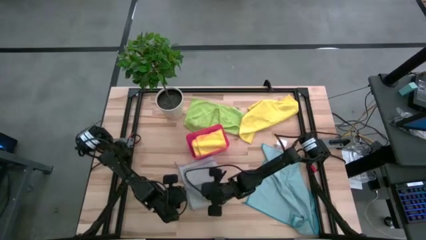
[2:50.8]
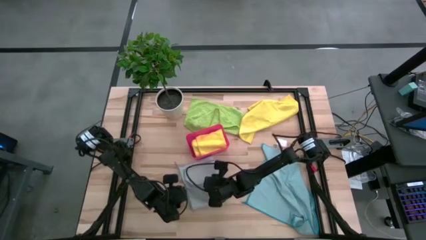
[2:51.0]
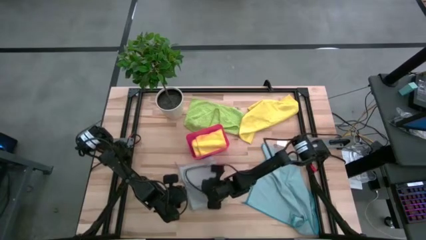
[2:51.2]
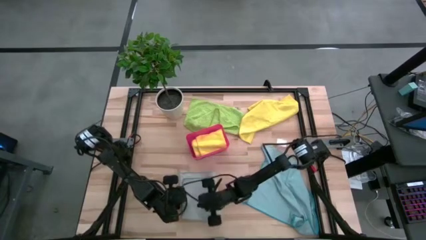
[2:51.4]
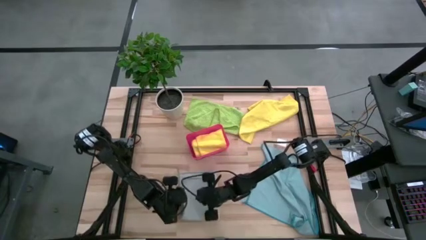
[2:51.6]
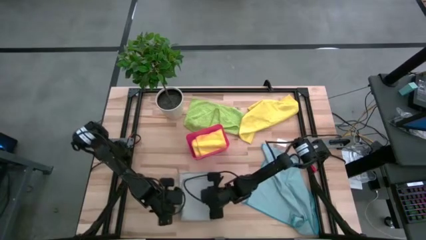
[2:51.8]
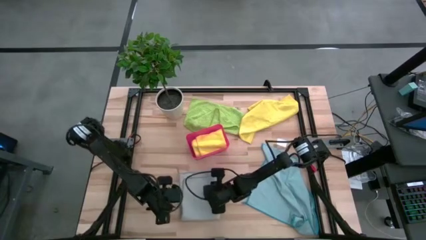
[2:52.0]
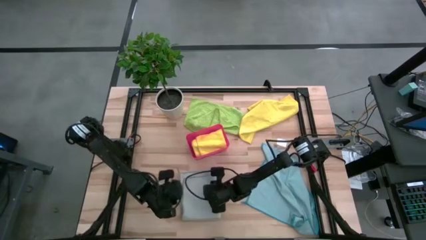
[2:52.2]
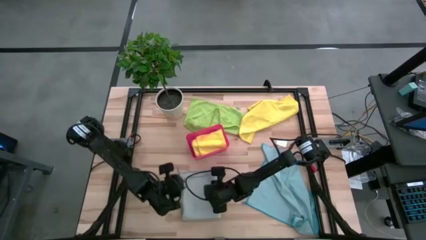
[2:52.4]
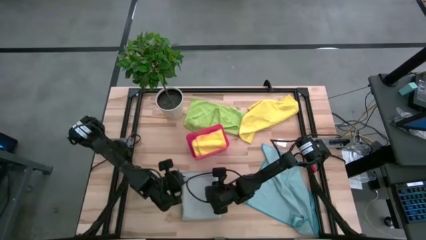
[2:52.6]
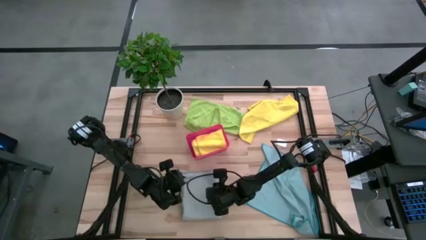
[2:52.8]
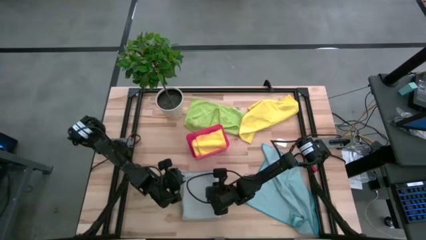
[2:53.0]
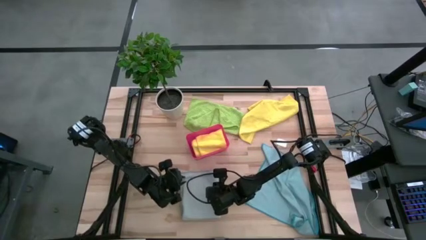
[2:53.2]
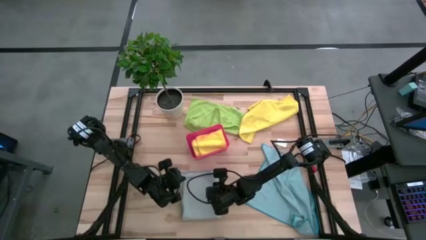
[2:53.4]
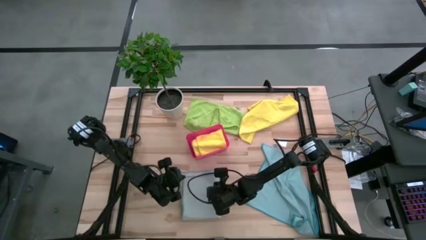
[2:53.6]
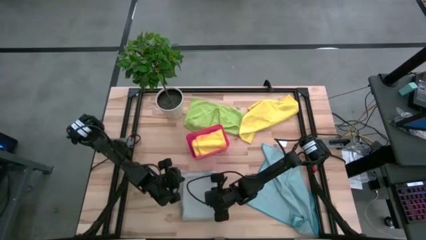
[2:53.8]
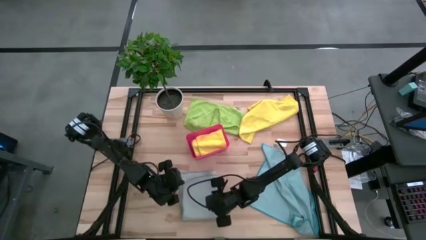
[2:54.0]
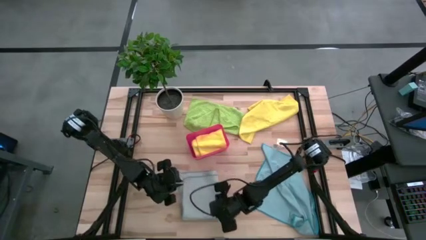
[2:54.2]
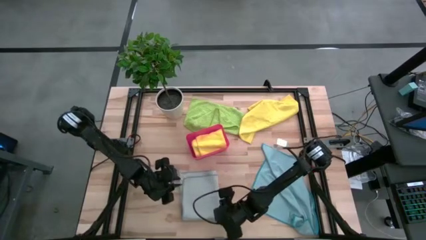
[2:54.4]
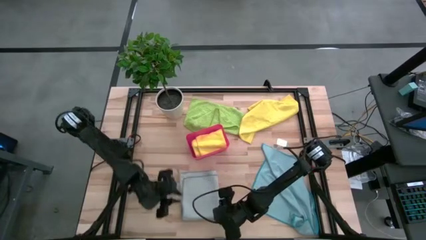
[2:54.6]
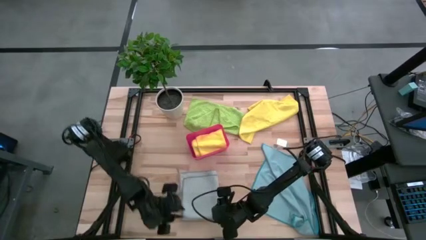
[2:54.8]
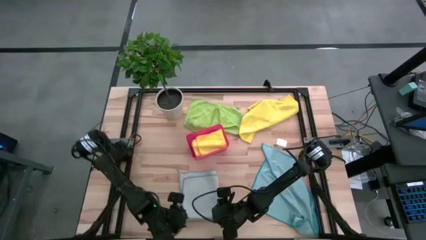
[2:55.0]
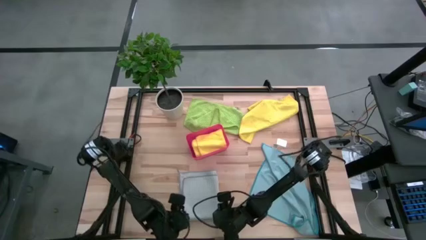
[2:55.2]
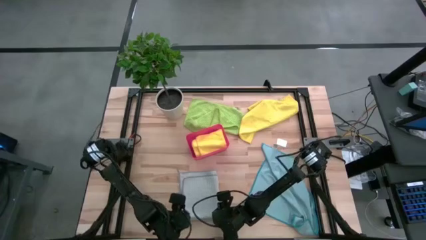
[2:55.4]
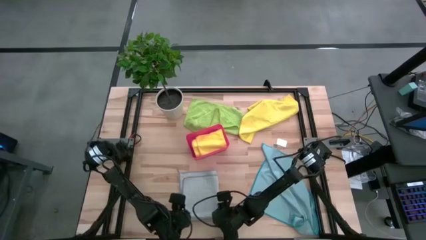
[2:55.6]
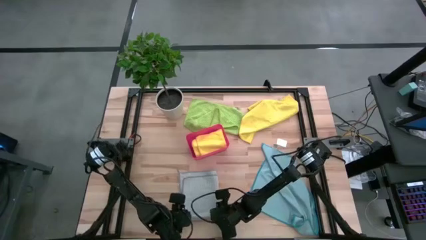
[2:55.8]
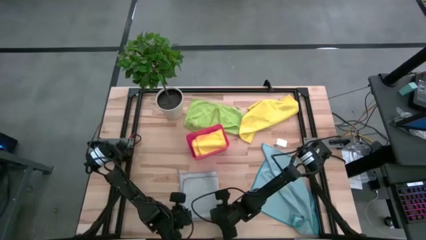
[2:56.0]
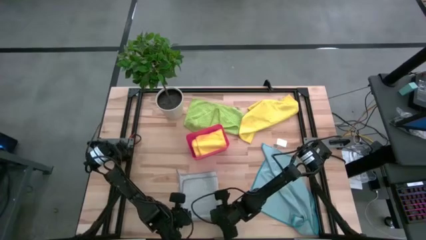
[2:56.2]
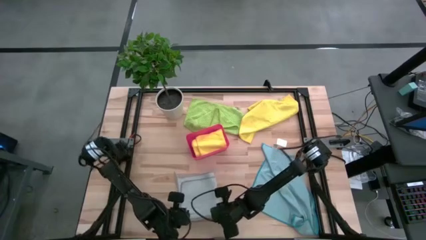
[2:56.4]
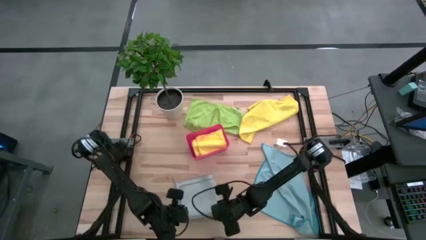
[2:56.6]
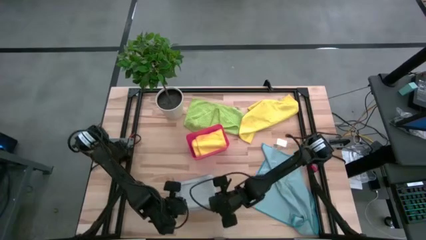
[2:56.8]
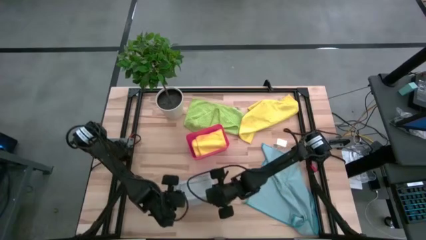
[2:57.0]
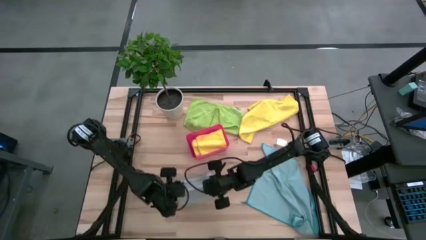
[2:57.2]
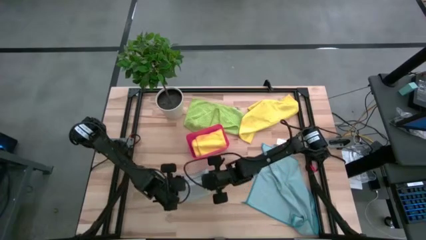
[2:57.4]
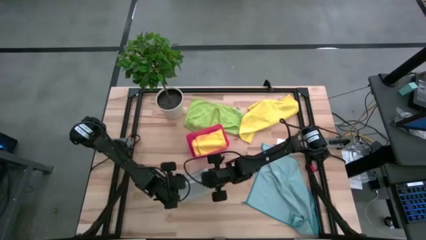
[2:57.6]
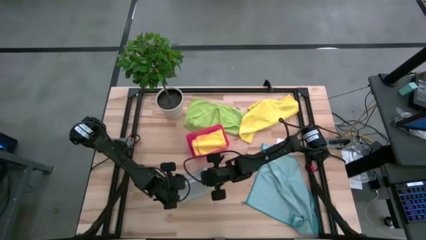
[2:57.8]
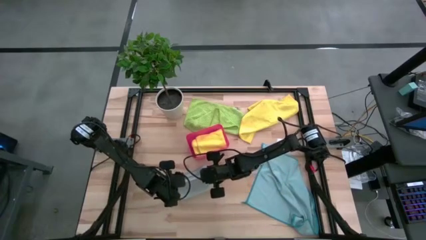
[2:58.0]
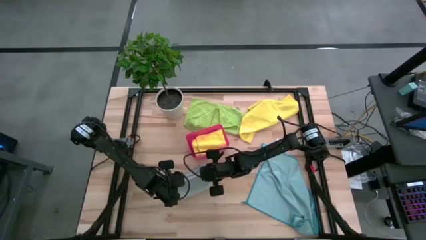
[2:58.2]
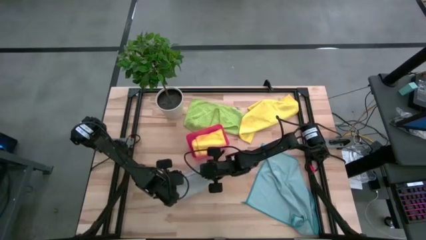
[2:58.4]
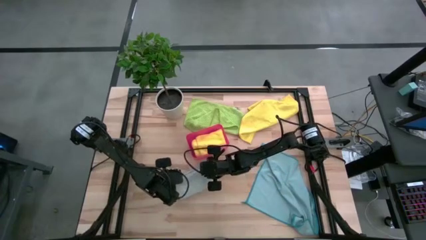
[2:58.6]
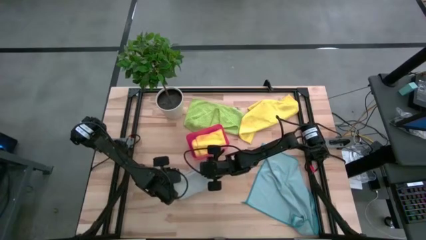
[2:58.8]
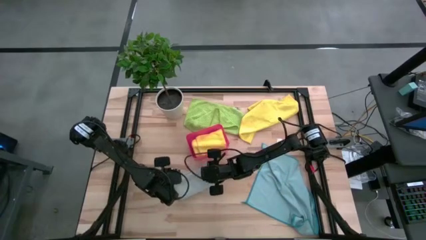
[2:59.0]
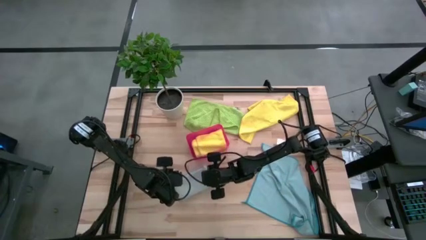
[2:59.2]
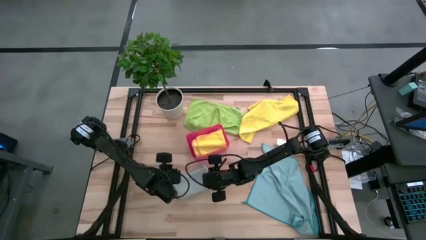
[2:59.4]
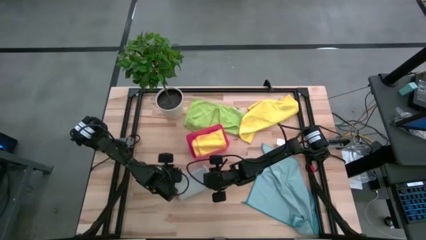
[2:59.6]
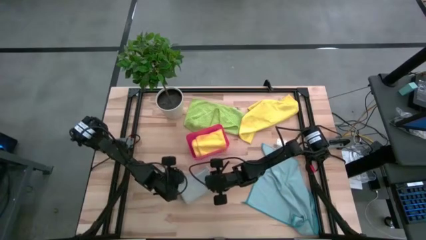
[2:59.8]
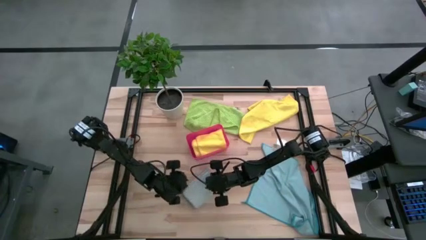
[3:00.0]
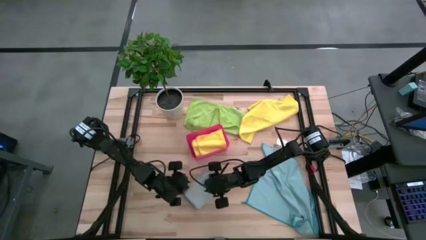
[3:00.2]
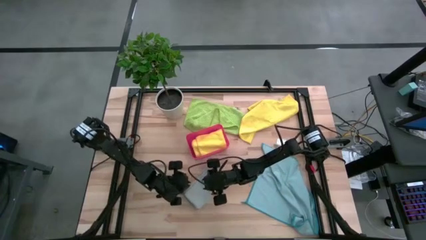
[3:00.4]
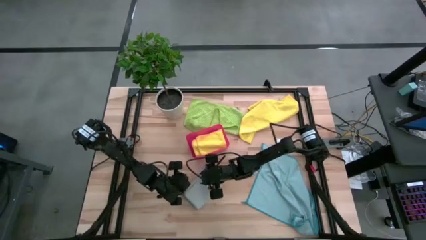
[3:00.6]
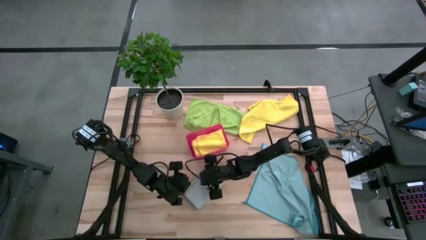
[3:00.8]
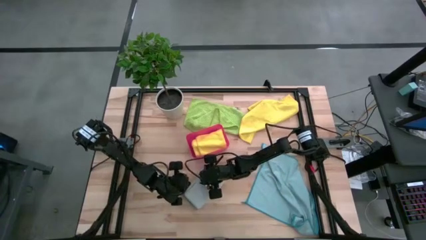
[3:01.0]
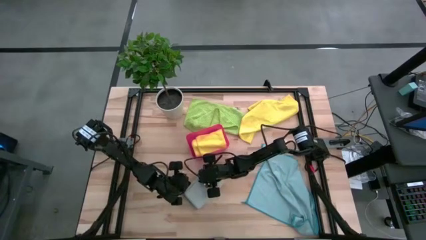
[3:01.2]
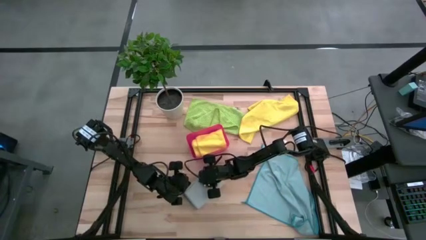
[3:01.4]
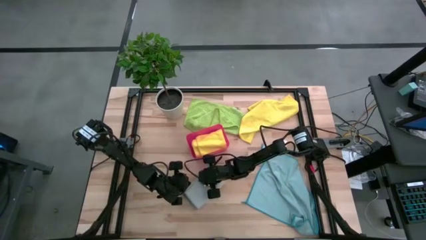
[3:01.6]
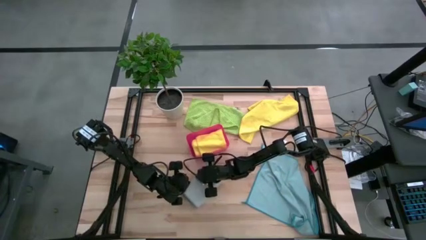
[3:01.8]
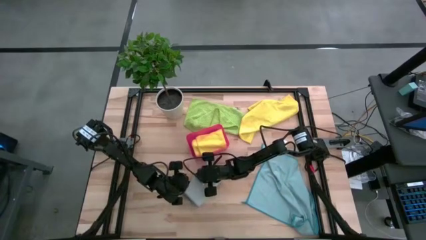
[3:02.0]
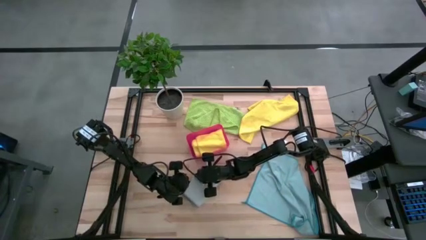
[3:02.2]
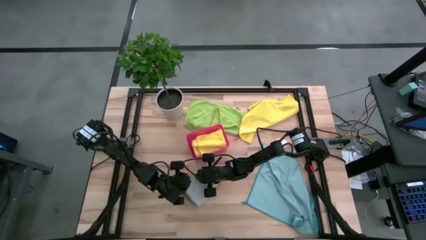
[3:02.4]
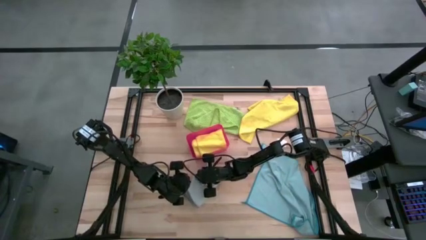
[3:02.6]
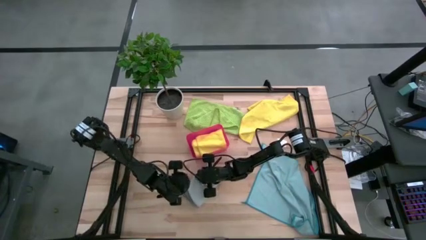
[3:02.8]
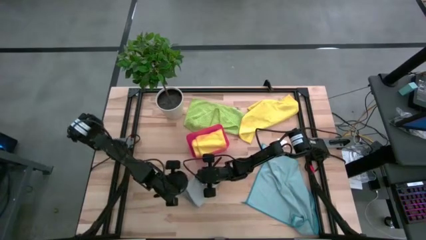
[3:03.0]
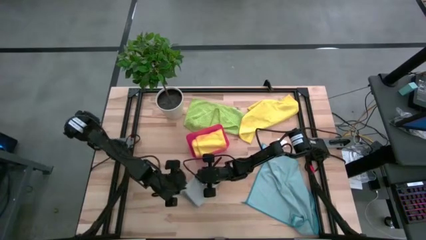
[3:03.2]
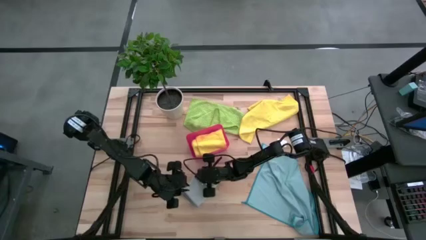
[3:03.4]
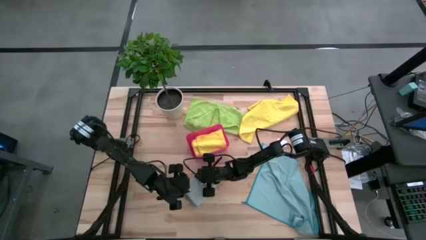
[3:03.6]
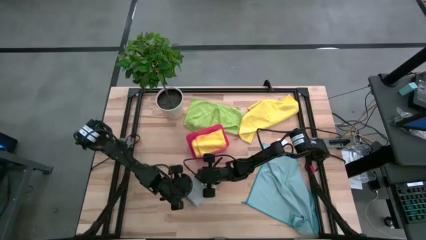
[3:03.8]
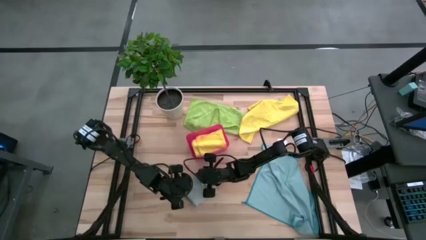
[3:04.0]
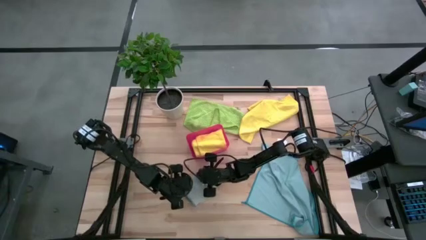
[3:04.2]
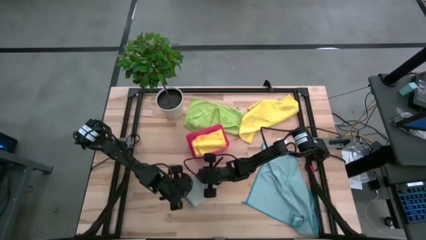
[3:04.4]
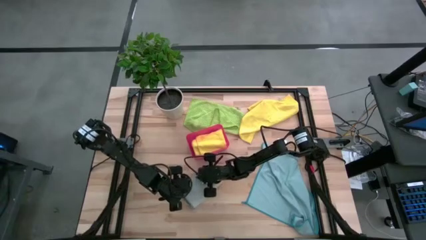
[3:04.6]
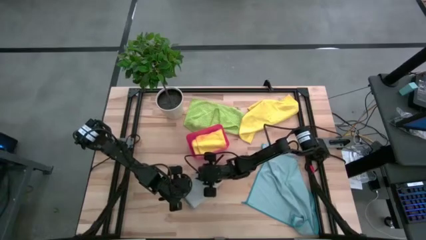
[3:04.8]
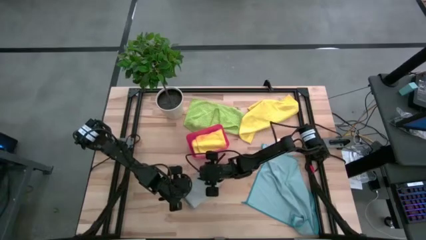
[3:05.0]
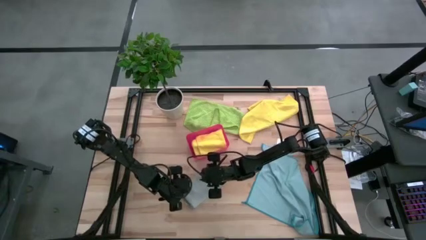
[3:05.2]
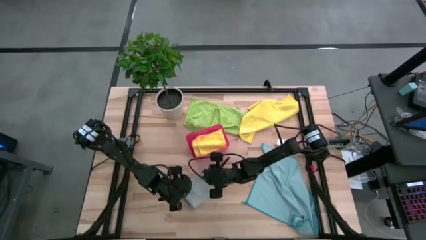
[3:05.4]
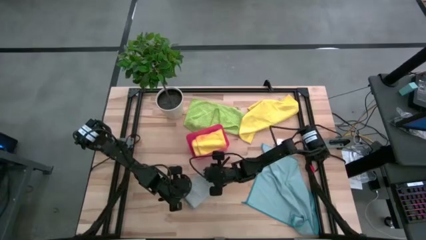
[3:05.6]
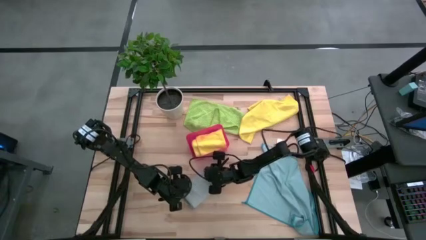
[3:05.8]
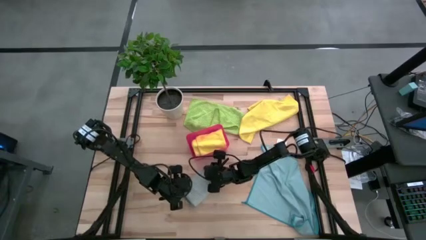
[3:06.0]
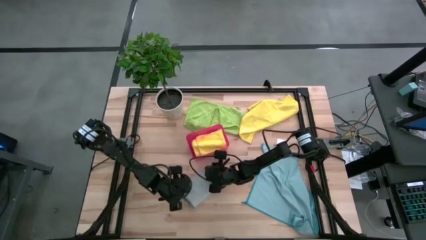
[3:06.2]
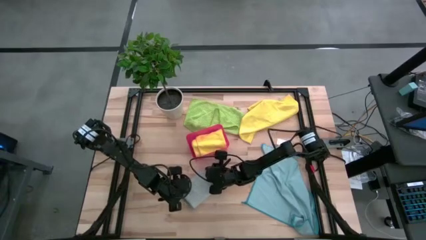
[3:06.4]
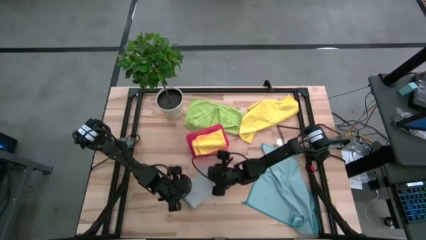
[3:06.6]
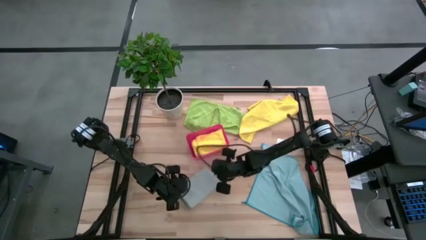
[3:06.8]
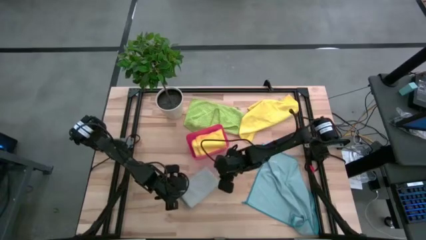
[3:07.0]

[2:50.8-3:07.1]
Task: Fold microfiber towels
Fold the gray microfiber cloth
